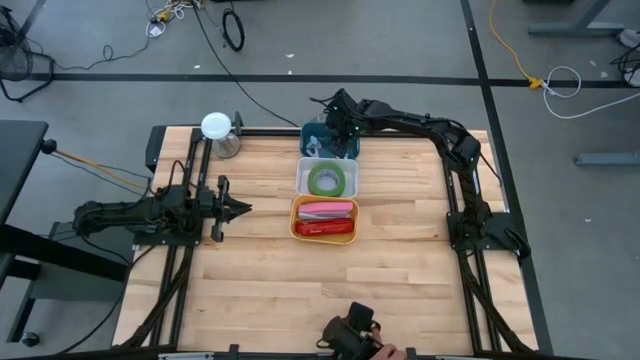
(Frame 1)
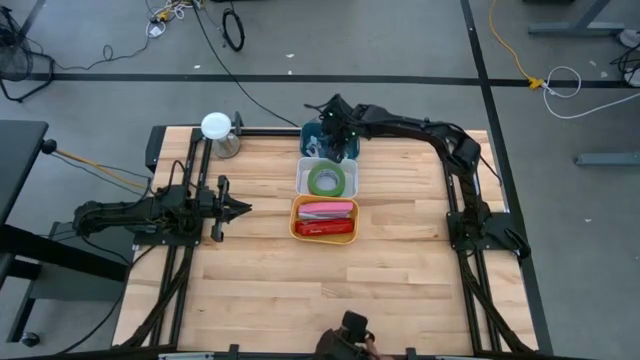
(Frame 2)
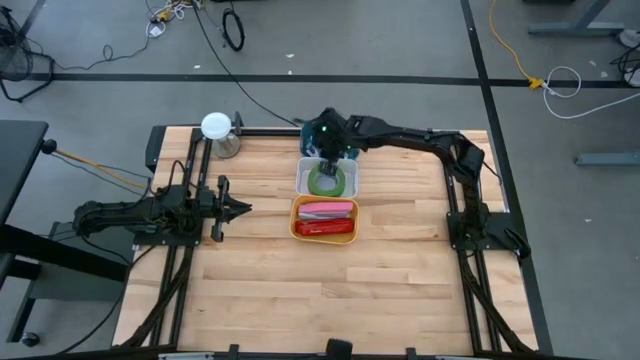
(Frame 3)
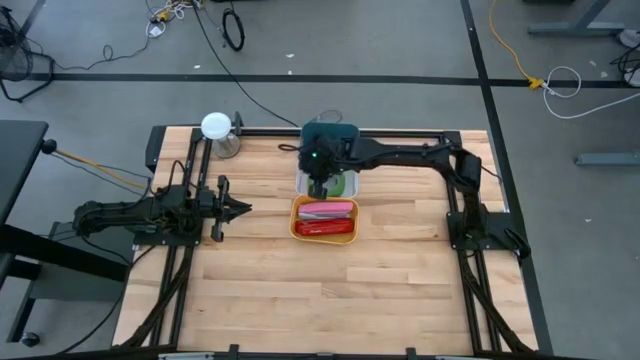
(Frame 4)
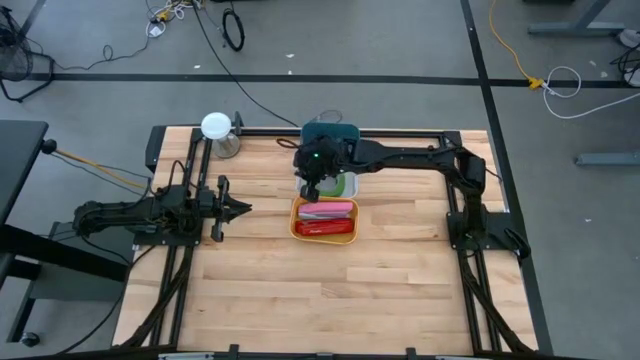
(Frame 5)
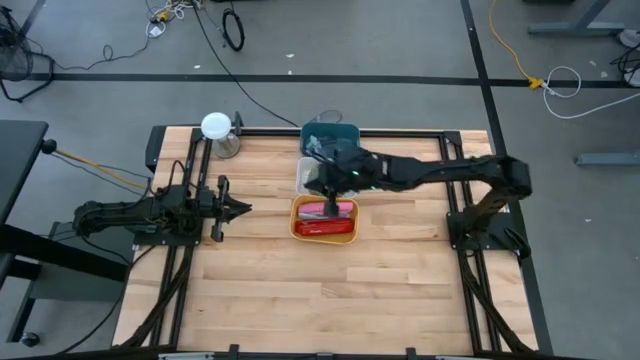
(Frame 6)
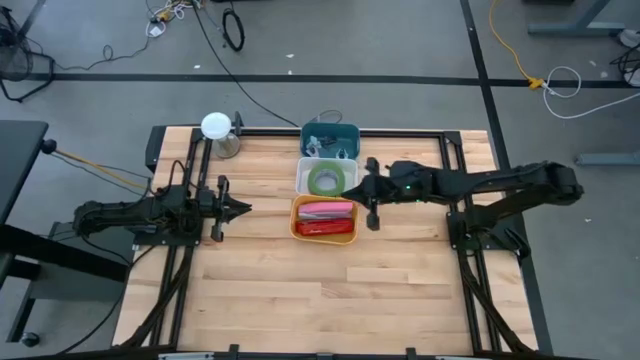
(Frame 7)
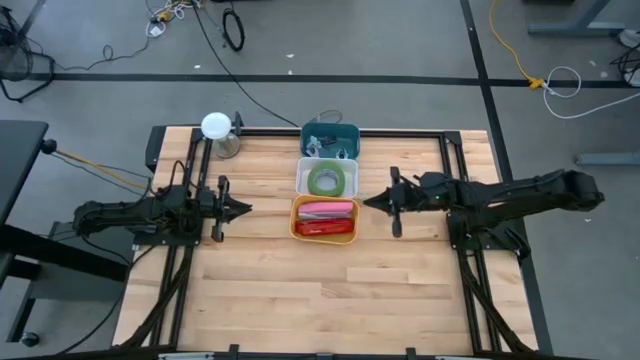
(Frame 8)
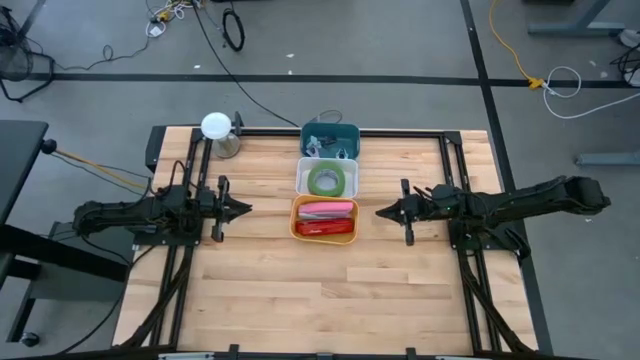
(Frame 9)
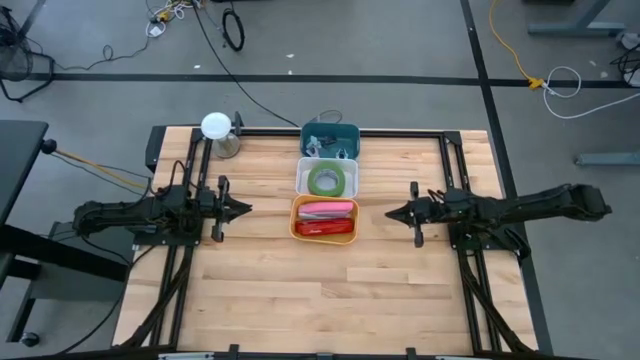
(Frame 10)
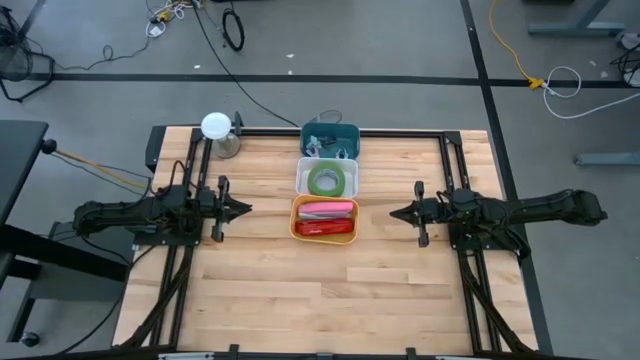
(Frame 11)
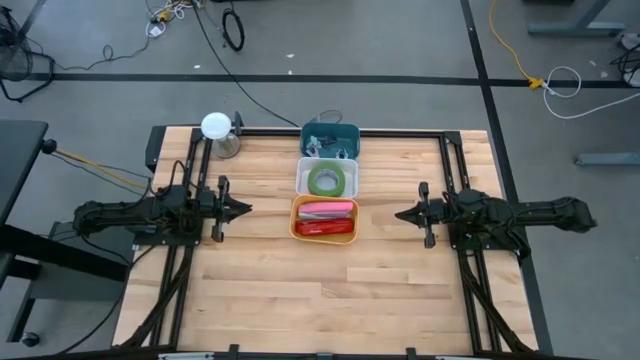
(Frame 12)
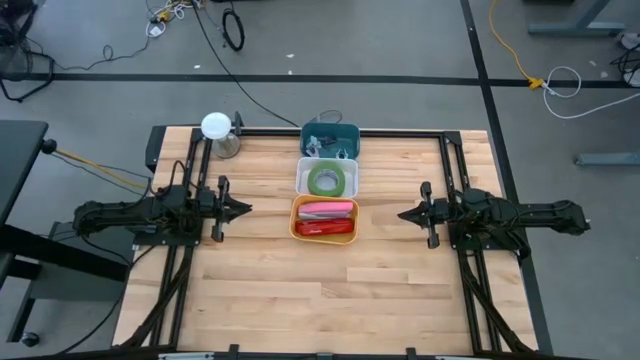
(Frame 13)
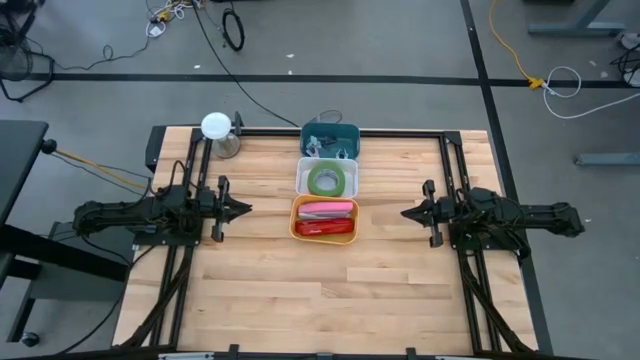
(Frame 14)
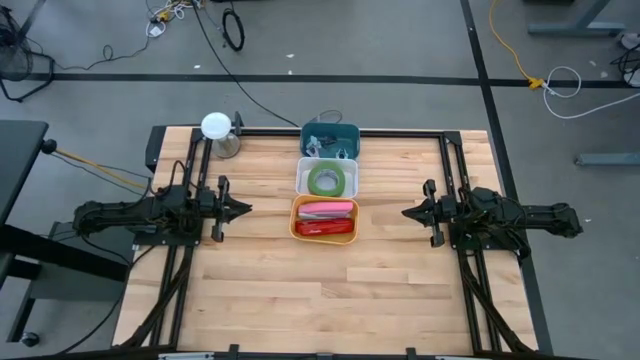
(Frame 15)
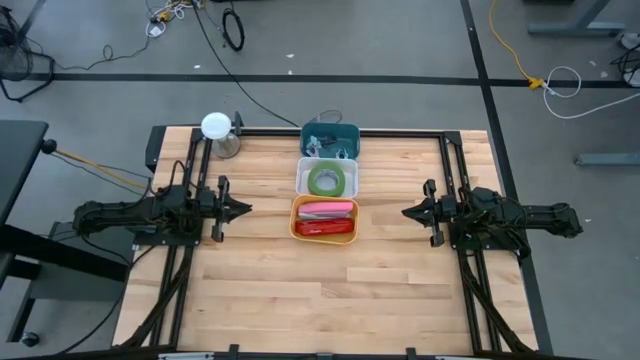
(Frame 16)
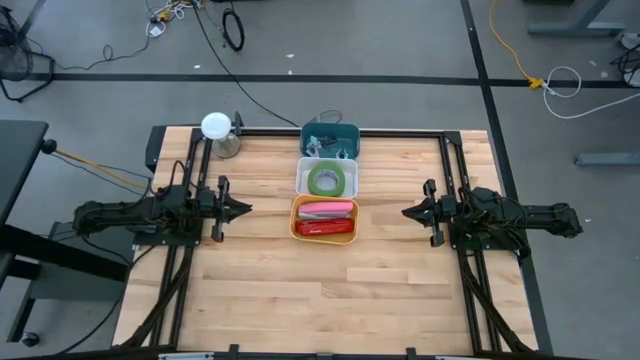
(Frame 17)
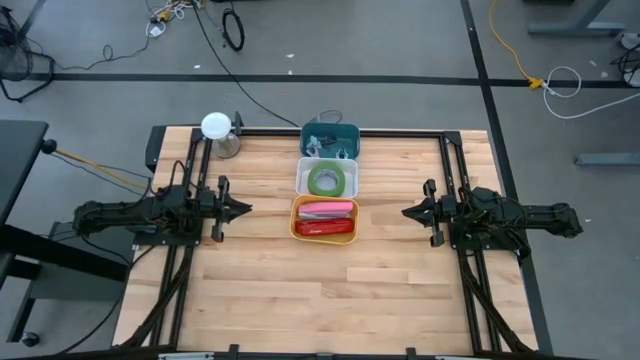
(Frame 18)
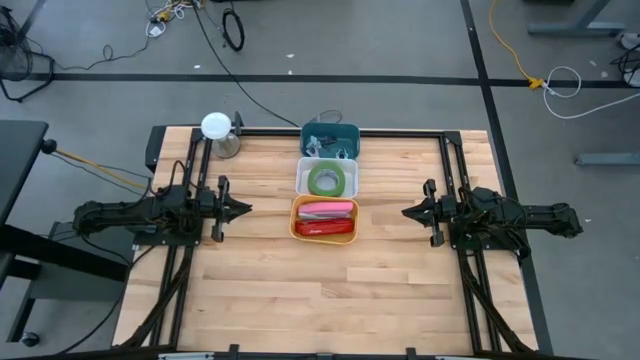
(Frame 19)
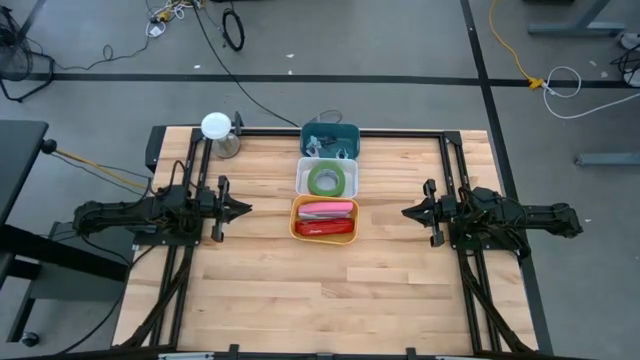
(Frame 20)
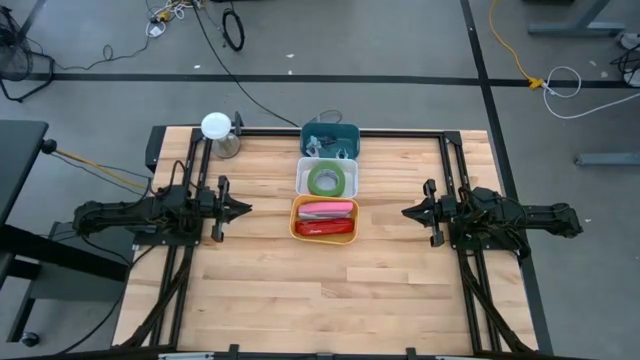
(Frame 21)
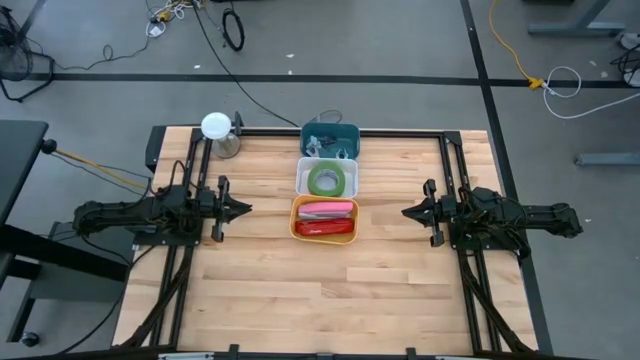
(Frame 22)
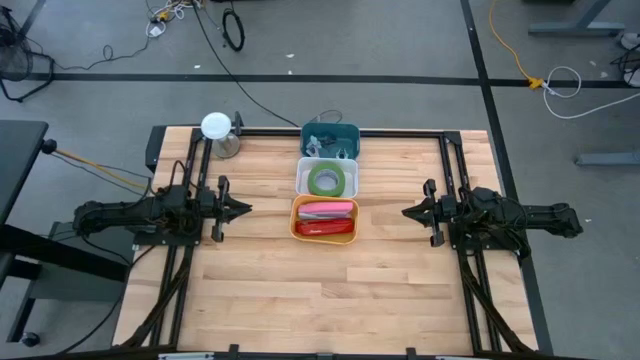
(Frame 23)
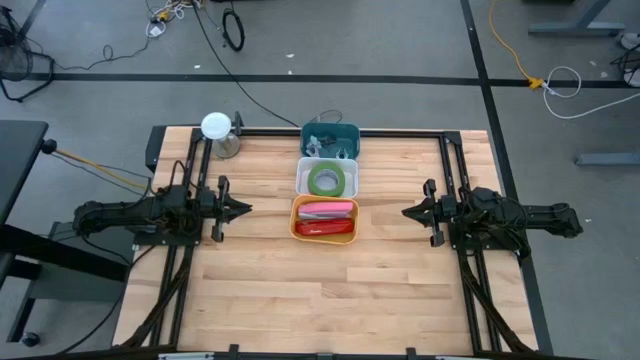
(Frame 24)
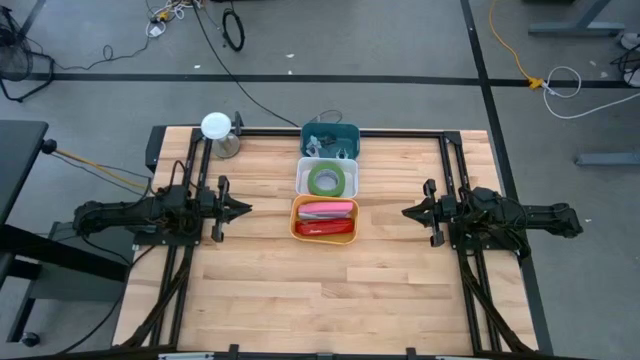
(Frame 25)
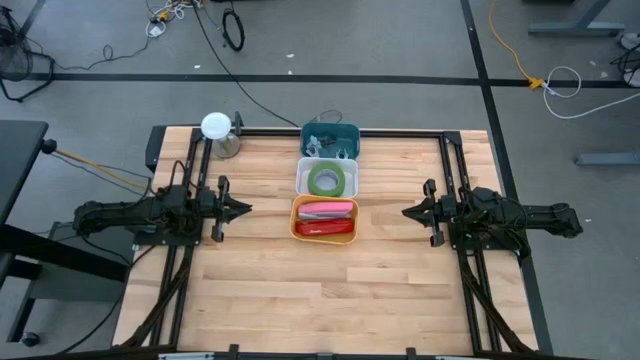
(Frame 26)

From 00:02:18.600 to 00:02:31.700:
Task: Pick and place Stapler, Stapler remover, tape
Return to Home Position

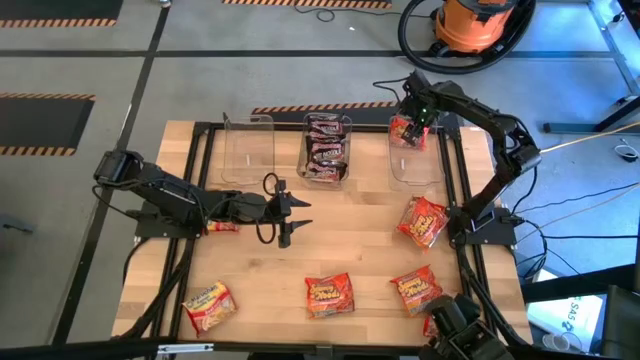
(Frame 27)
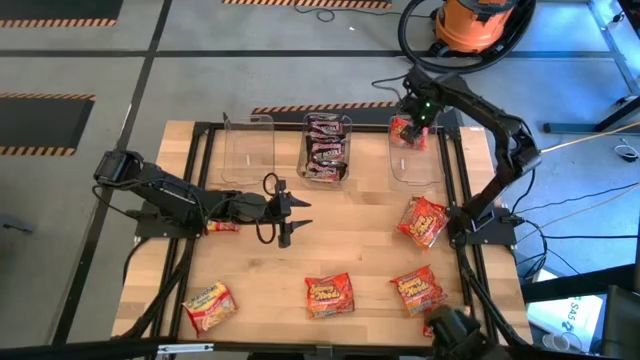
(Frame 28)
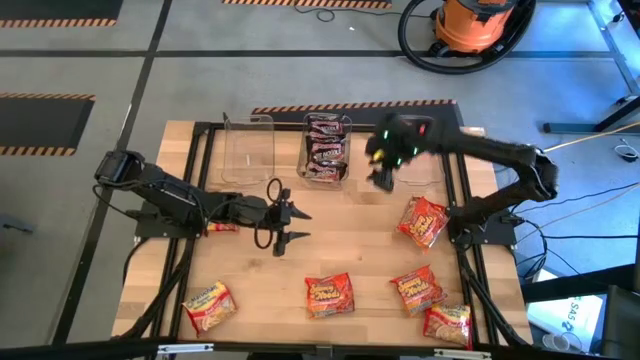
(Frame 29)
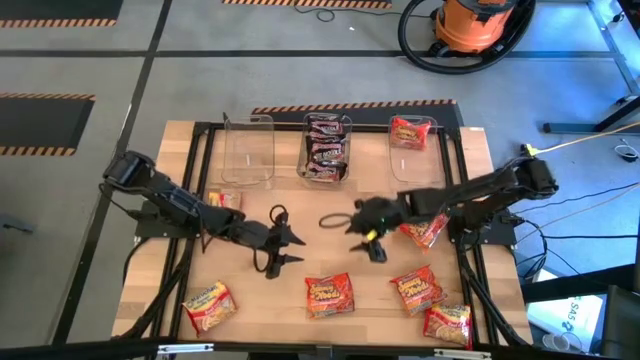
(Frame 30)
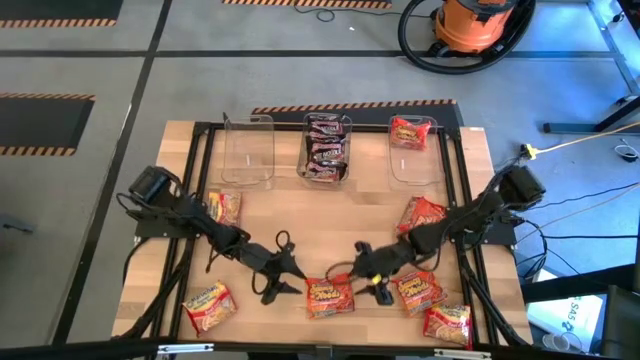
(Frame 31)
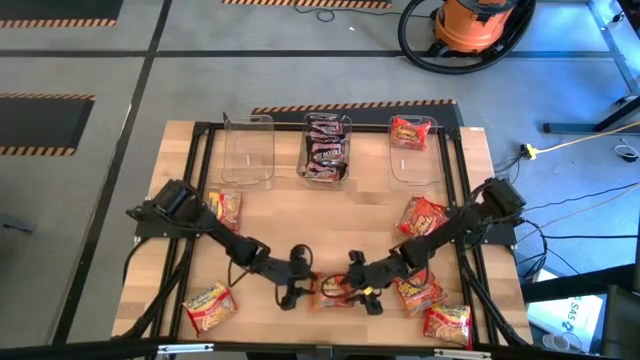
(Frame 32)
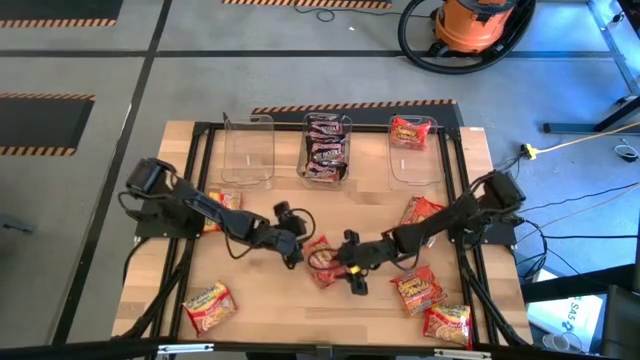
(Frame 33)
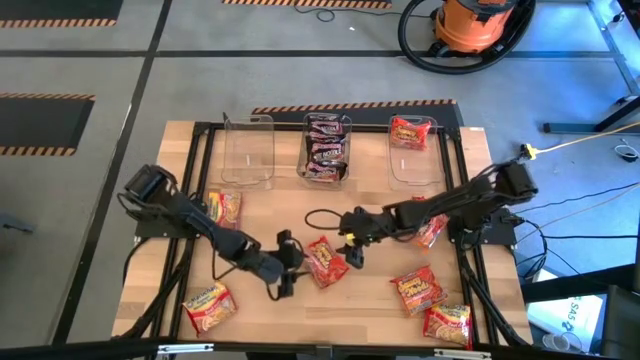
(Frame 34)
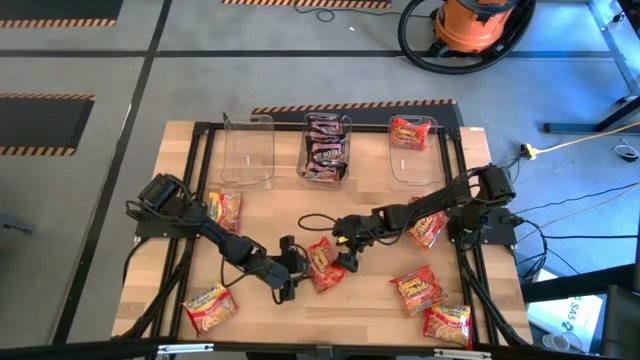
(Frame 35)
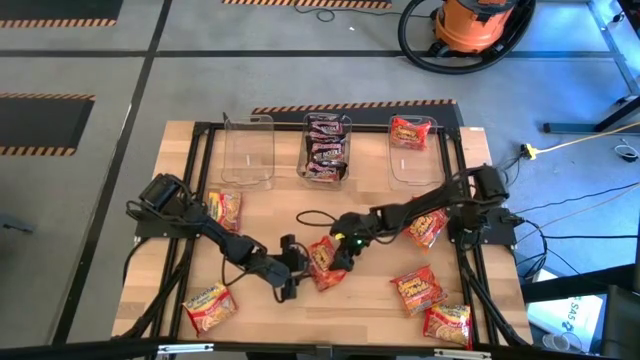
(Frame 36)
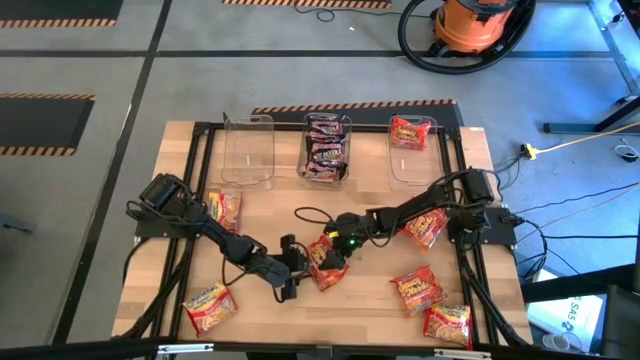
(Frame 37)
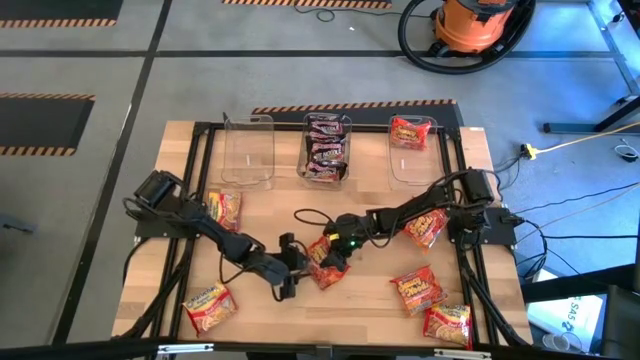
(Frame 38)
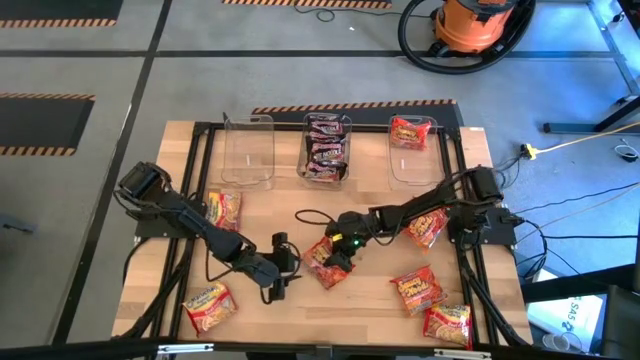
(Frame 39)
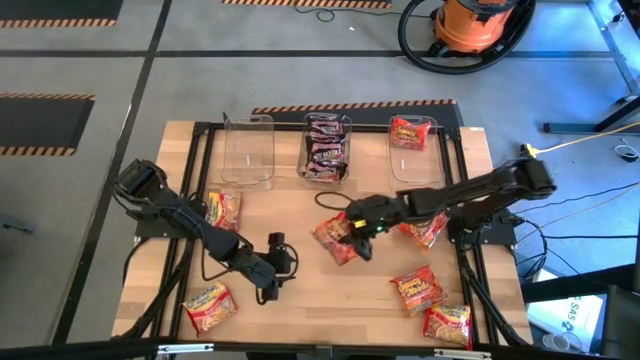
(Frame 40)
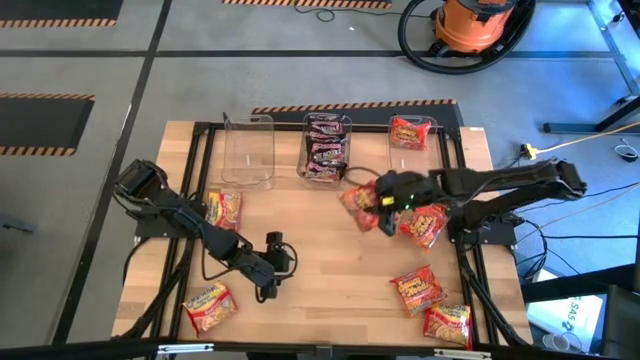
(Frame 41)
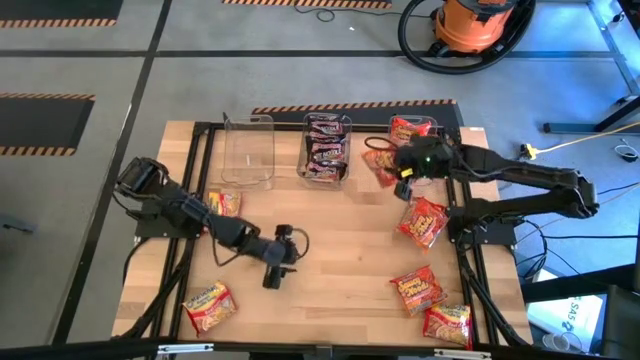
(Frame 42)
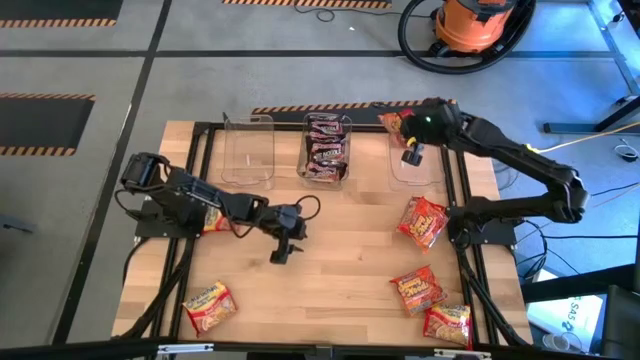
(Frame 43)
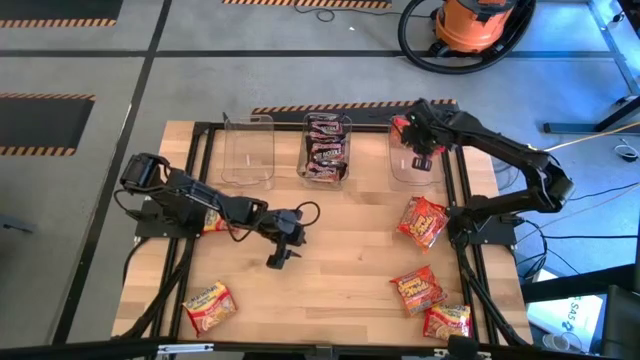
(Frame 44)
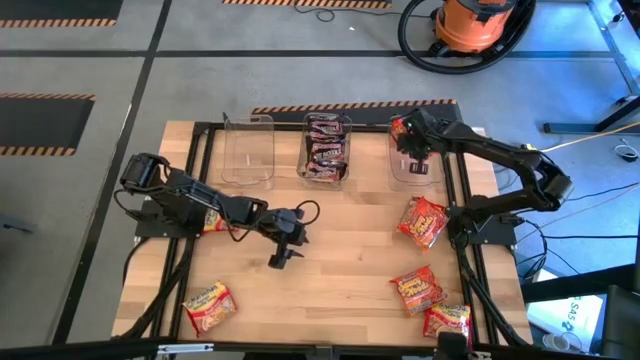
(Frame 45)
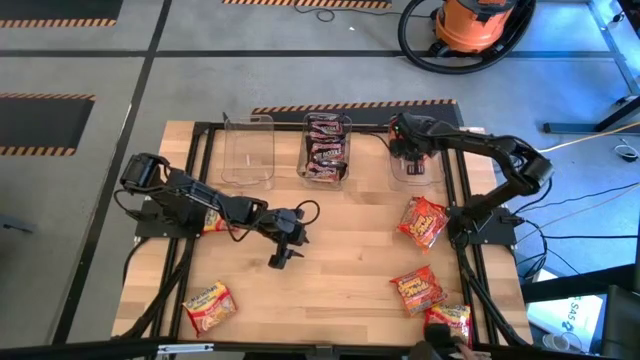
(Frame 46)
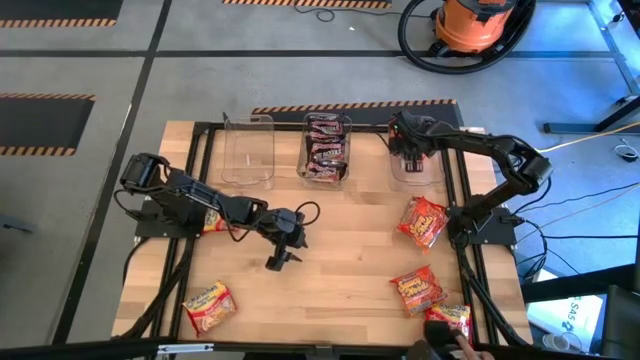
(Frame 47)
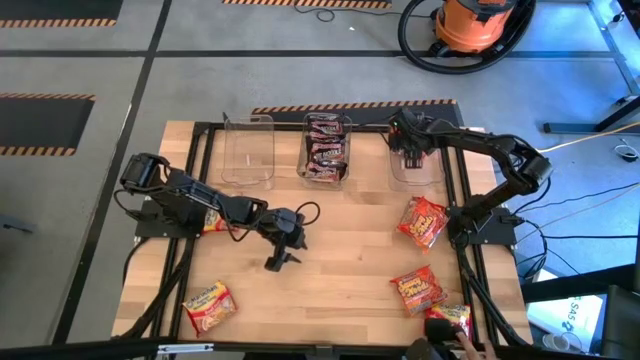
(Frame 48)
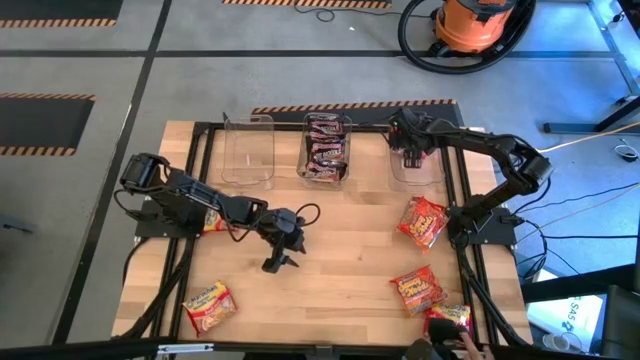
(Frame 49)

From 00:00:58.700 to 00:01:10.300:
Task: Sort Maruchan noodles
Put the orange noodle pack into the right transparent bin
